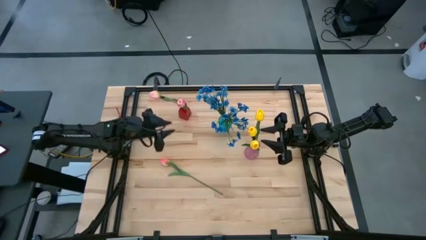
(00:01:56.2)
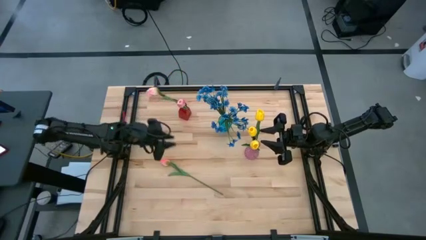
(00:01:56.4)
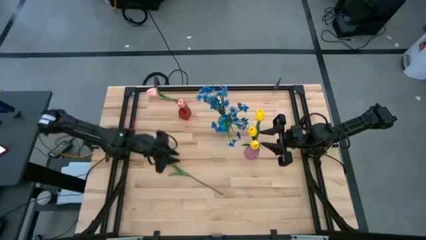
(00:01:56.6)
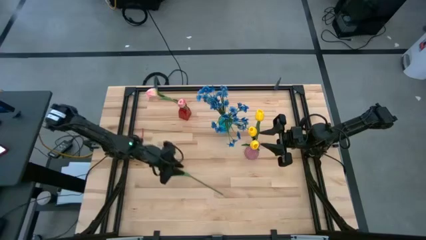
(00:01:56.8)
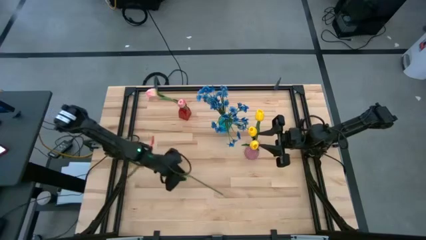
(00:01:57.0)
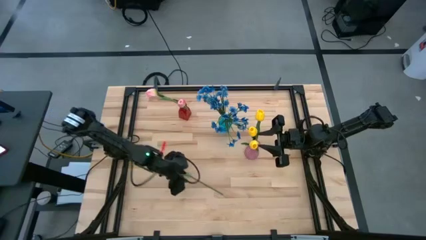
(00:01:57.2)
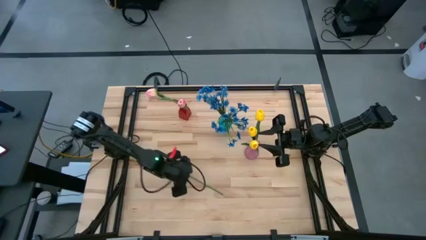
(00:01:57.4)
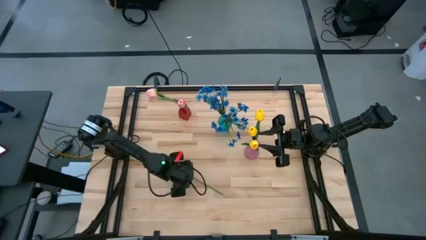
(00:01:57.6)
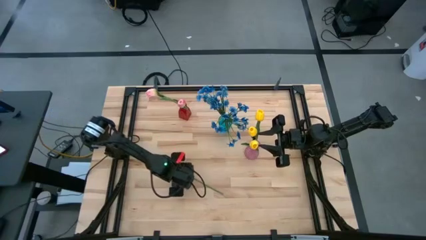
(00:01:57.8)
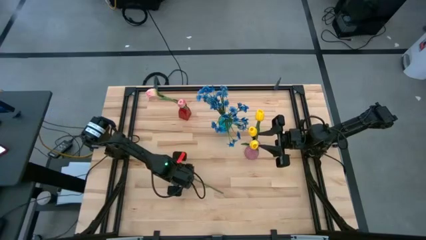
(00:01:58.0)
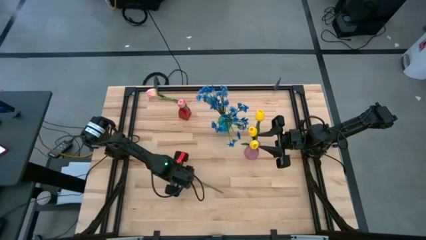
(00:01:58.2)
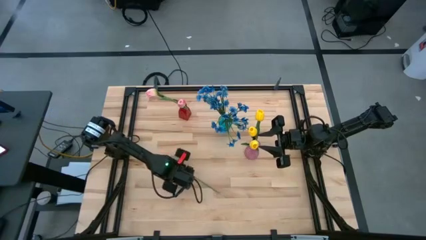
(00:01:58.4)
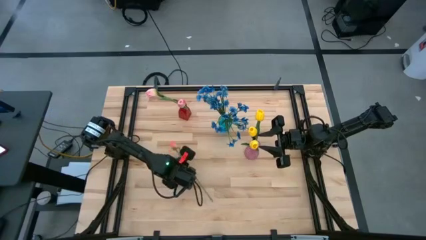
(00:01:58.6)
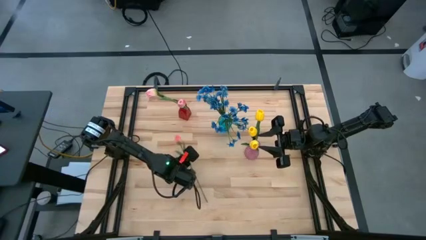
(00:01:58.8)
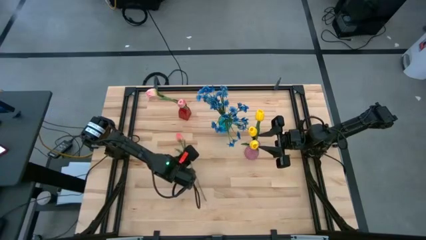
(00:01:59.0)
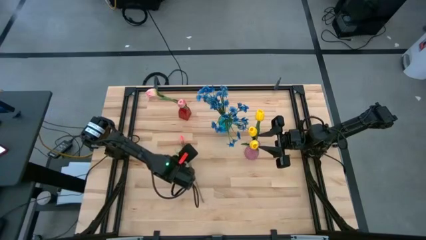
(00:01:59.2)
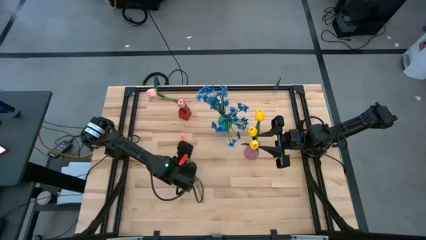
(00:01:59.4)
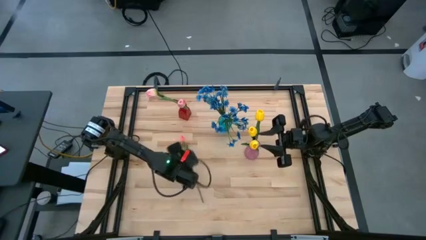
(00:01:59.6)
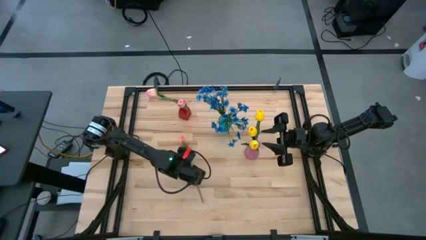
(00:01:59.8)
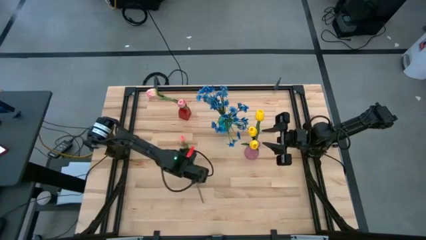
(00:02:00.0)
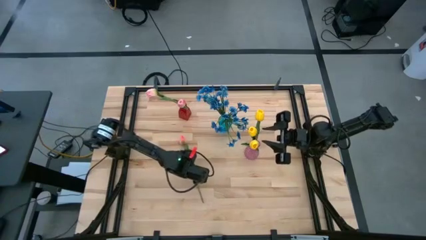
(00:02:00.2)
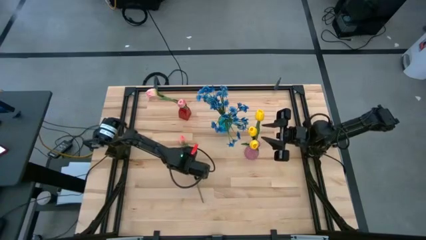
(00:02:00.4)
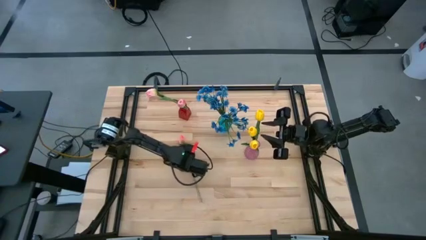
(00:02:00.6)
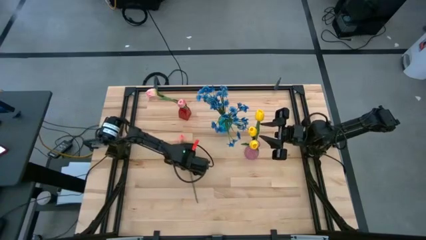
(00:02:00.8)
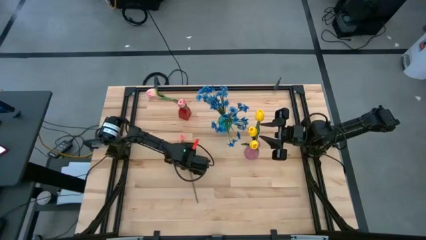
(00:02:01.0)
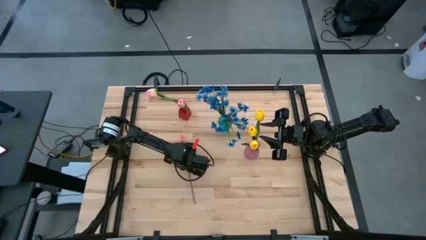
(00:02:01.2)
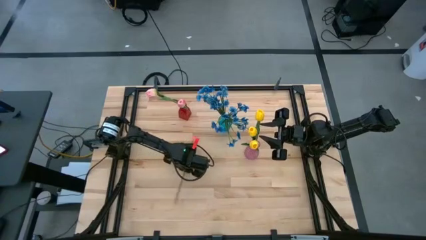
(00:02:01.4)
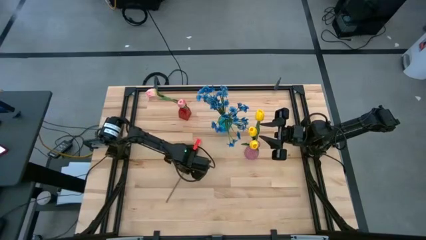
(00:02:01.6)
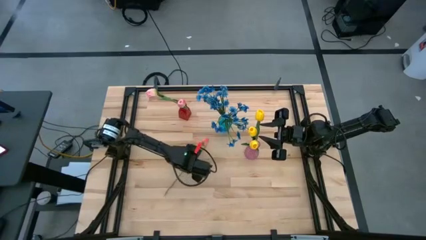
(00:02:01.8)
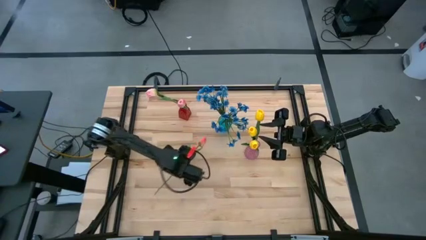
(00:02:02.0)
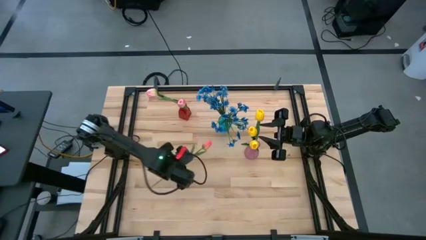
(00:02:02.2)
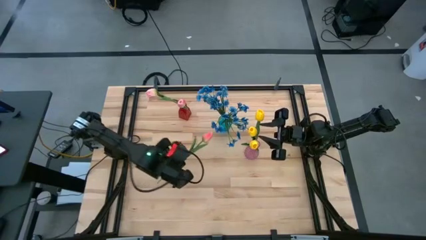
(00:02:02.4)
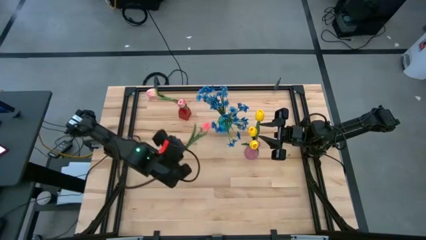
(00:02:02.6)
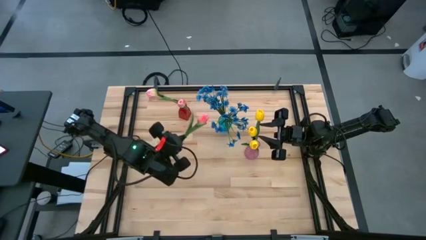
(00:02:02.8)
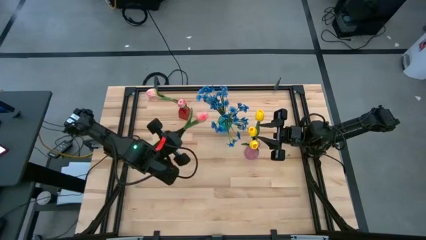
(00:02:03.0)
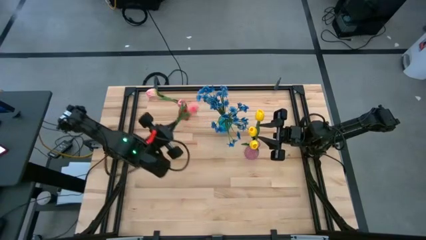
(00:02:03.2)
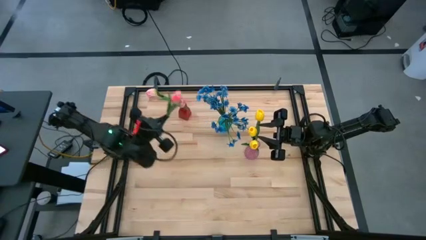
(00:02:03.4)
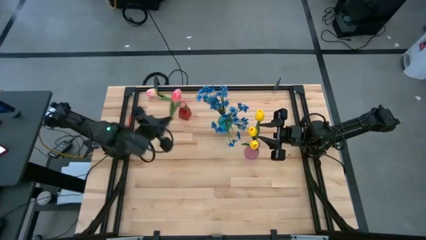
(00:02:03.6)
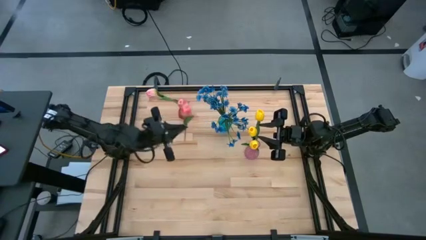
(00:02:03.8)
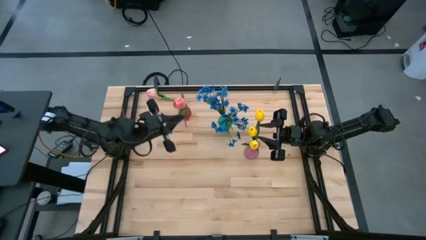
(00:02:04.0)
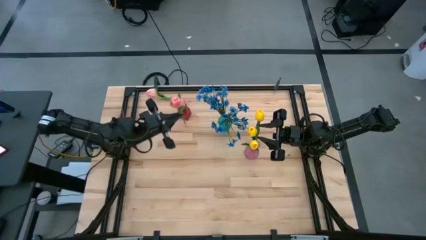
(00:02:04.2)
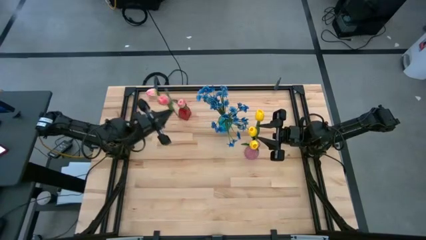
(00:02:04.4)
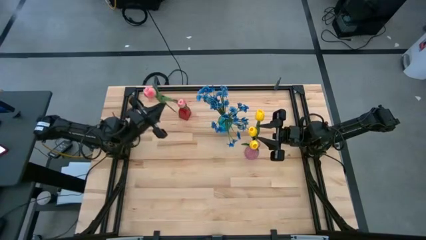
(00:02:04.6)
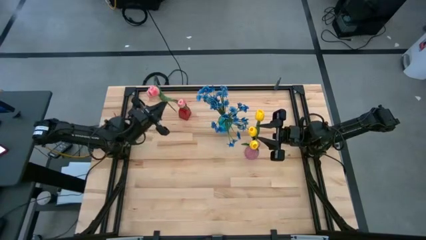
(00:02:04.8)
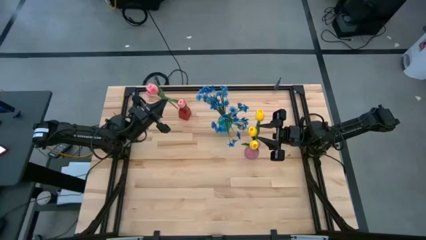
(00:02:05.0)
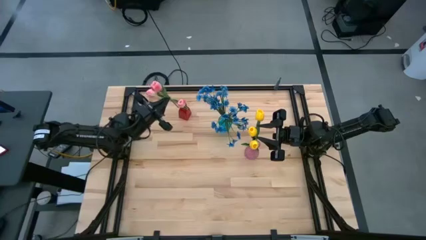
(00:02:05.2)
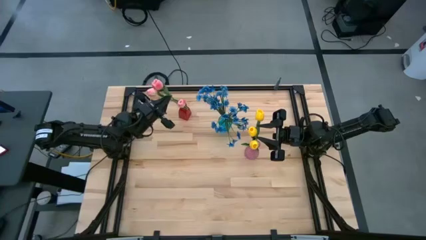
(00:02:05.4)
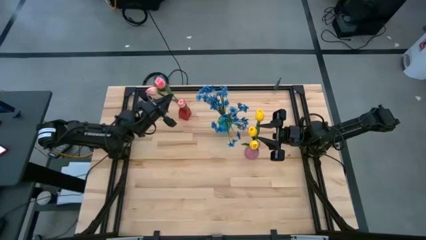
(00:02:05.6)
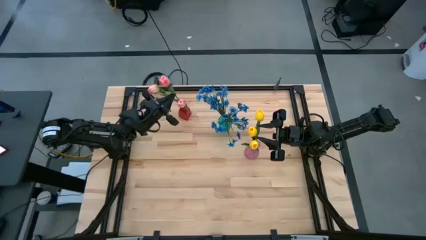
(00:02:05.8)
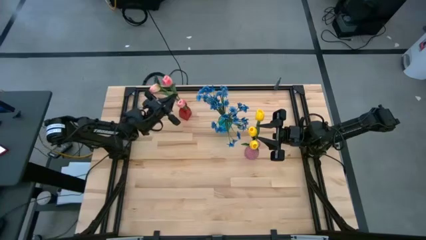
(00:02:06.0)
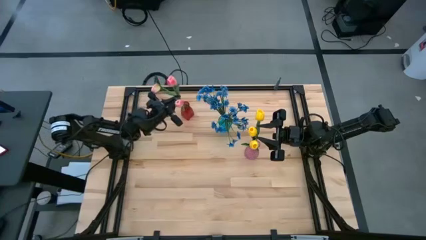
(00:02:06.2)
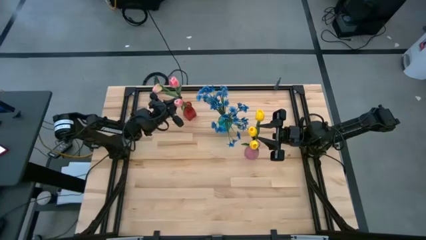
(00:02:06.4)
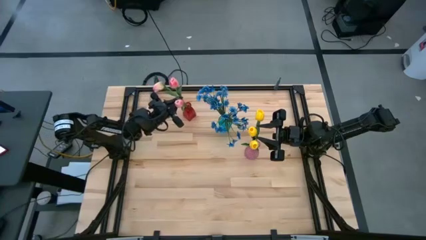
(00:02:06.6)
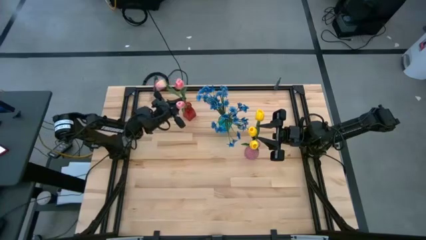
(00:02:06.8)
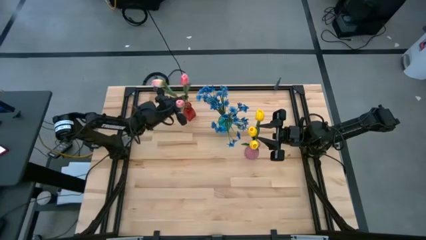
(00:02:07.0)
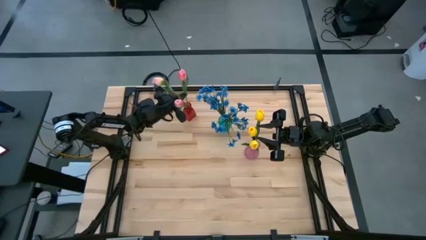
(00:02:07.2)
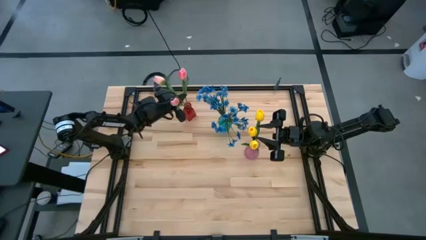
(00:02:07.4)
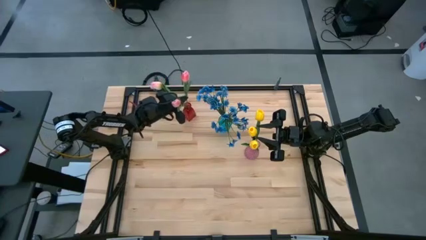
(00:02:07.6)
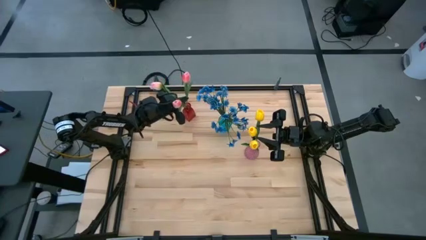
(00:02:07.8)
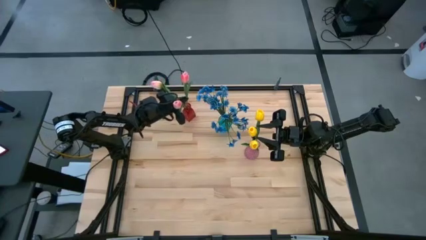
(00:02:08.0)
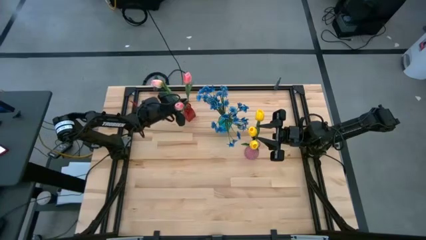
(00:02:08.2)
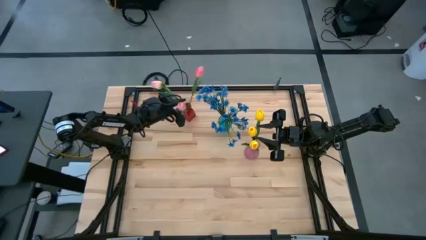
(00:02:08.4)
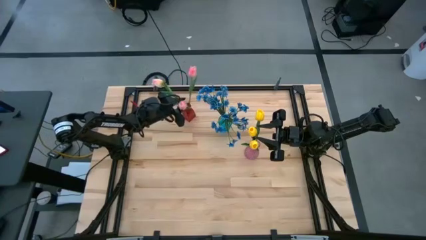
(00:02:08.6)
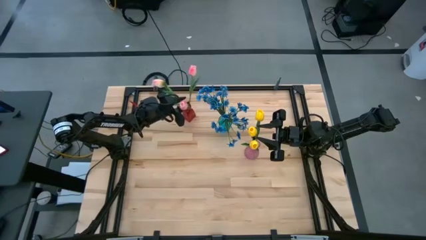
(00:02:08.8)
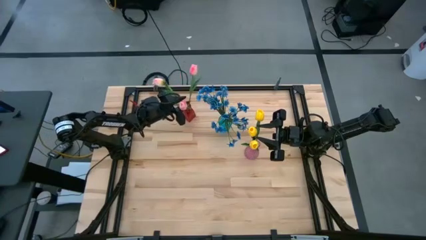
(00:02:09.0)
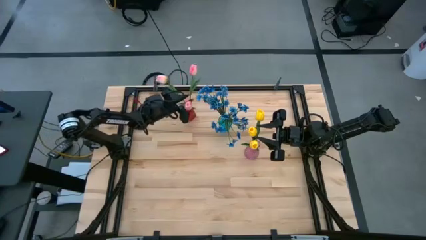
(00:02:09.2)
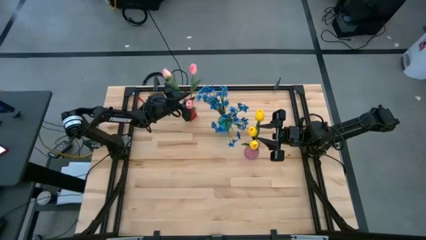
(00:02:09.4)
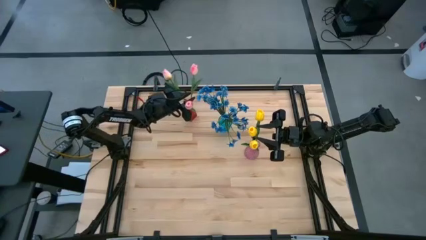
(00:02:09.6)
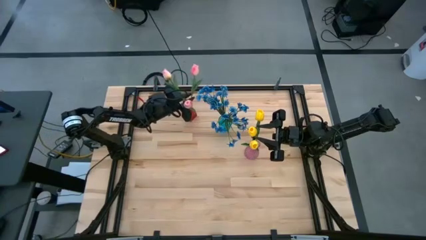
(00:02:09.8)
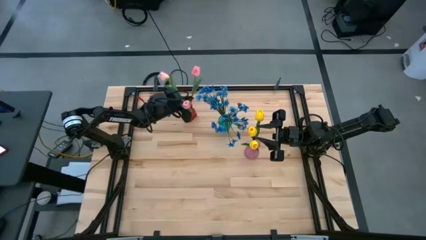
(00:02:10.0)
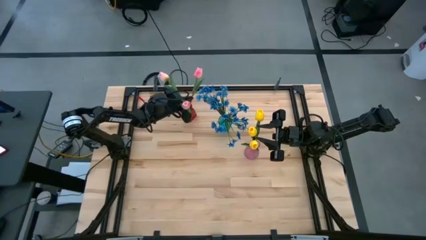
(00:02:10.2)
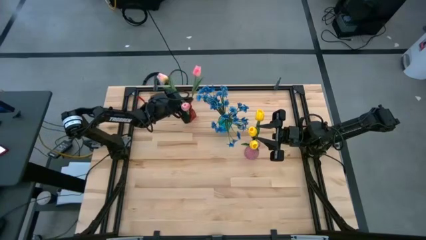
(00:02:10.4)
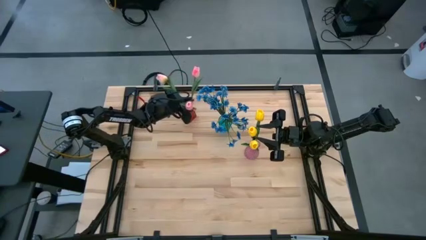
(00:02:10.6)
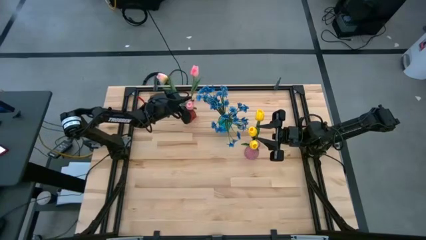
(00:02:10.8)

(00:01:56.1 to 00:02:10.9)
Task: Sort flowers into vase by color
Put the pink tulip into the red flower vase

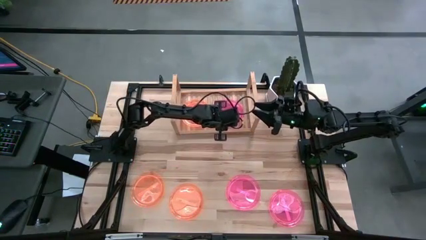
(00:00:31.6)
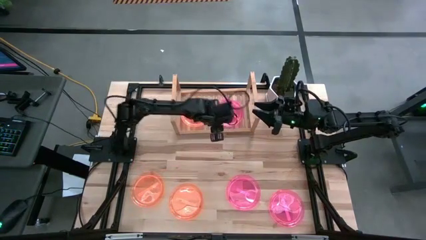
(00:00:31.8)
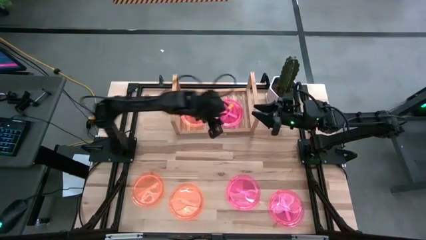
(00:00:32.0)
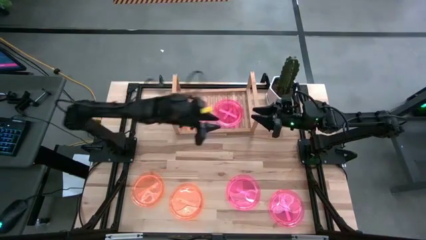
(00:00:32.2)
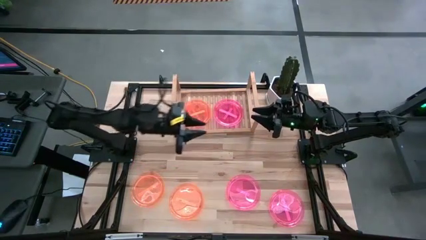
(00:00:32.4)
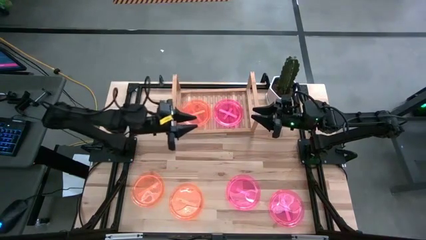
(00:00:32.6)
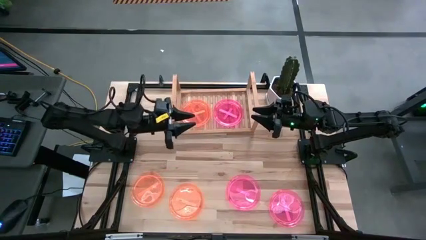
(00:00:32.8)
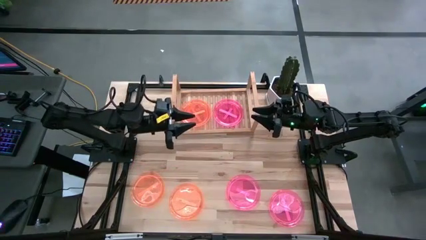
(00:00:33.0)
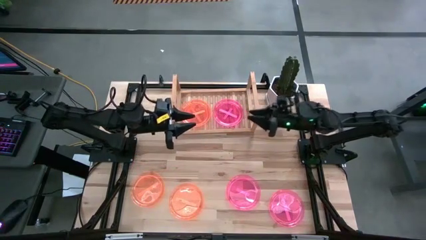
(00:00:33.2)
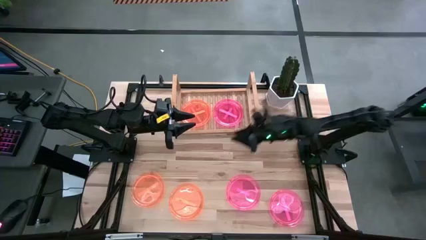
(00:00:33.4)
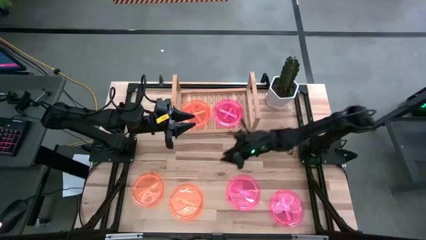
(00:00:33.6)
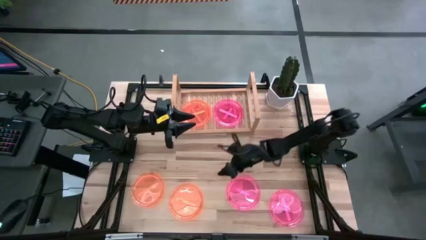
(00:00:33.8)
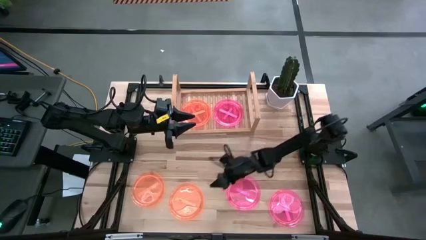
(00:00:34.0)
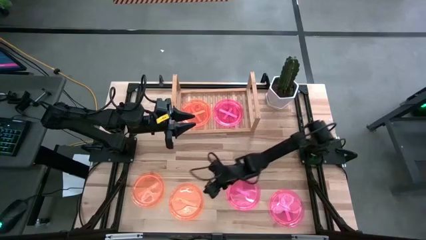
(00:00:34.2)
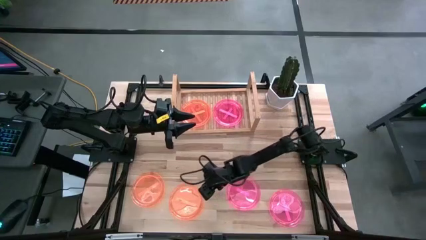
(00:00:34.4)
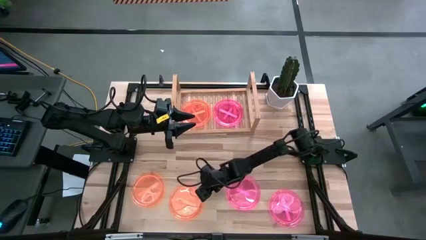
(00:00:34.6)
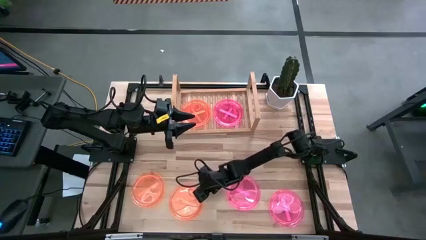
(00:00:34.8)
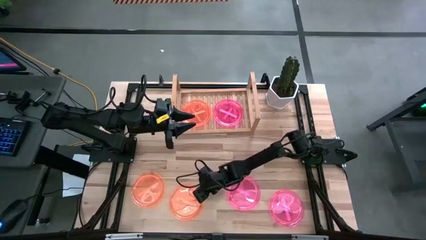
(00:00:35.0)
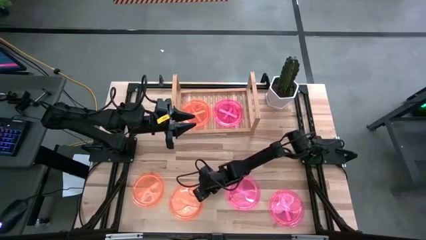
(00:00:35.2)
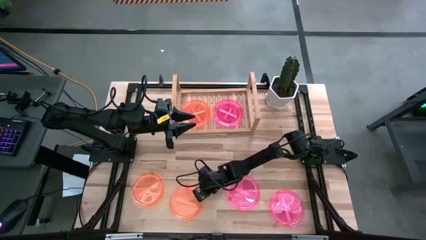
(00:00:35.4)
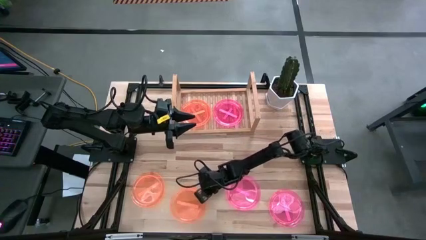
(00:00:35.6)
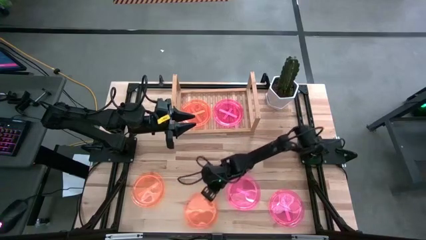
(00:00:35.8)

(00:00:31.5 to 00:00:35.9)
Task: Place and stack plates onto a shelf
Stack the right orange plate on top of the orange plate
